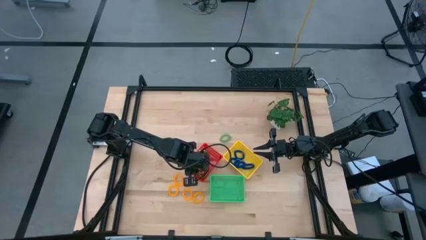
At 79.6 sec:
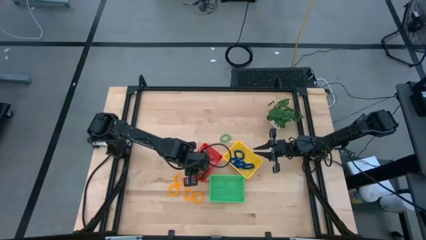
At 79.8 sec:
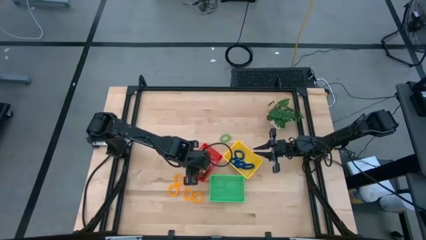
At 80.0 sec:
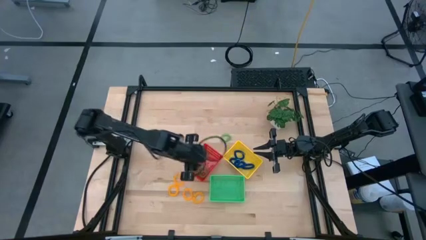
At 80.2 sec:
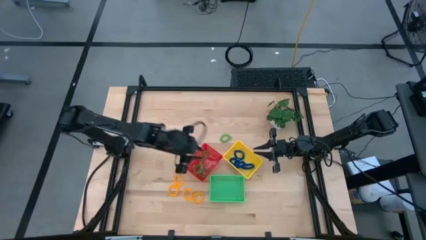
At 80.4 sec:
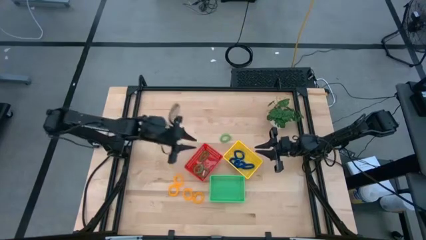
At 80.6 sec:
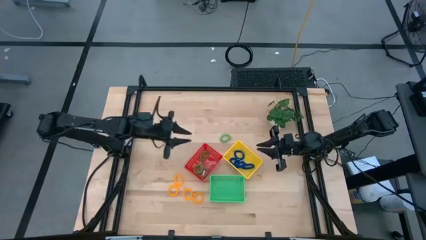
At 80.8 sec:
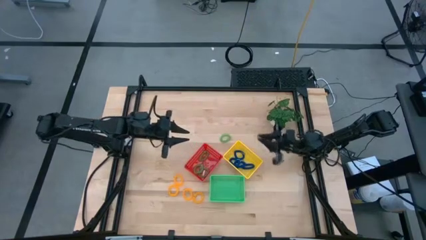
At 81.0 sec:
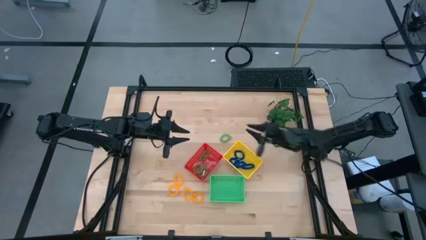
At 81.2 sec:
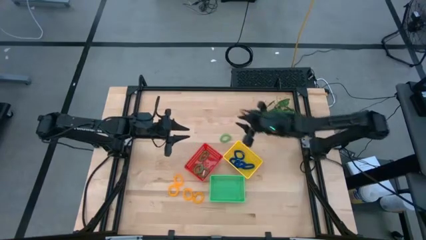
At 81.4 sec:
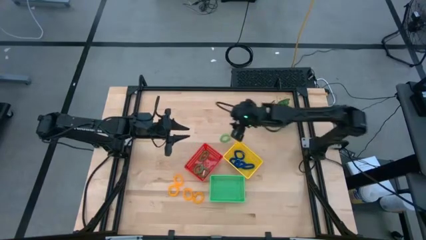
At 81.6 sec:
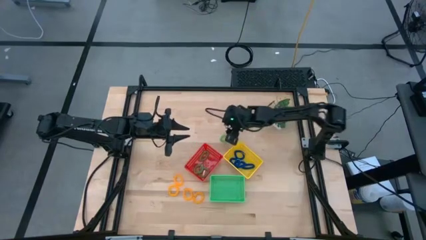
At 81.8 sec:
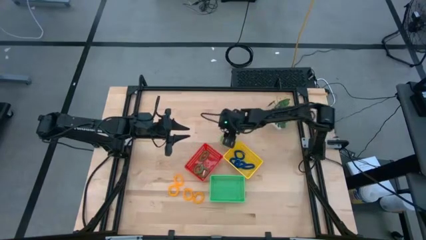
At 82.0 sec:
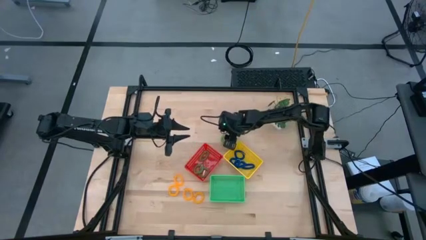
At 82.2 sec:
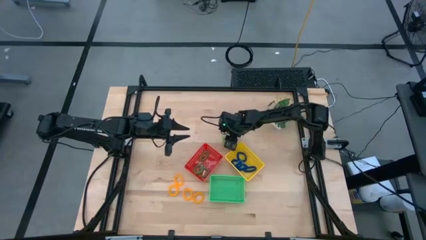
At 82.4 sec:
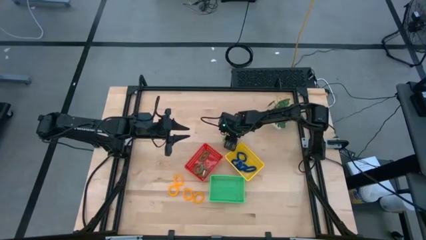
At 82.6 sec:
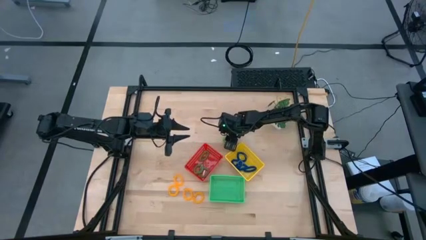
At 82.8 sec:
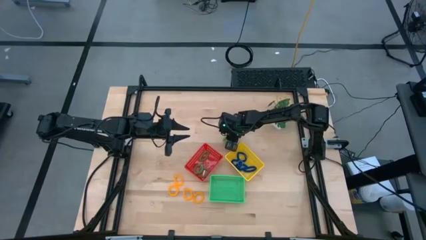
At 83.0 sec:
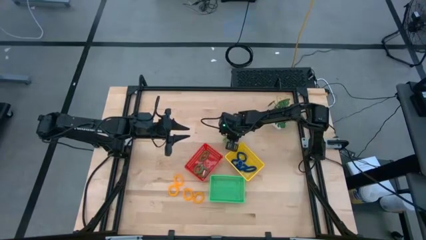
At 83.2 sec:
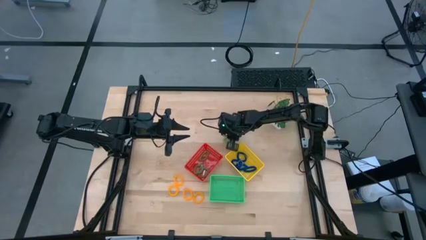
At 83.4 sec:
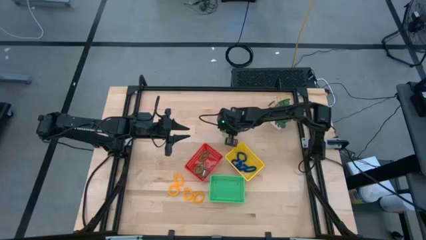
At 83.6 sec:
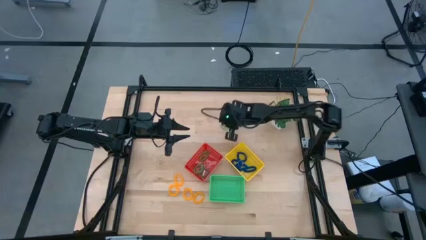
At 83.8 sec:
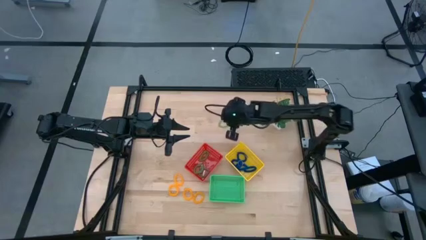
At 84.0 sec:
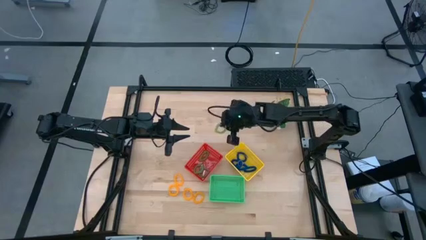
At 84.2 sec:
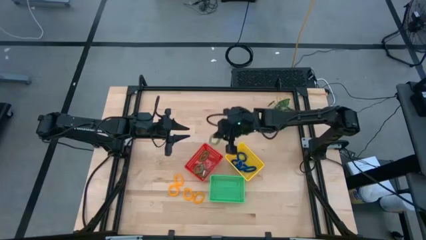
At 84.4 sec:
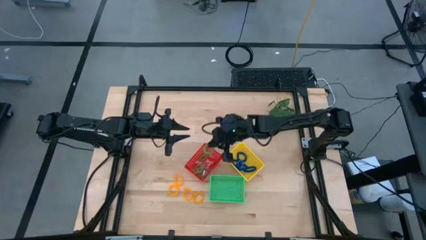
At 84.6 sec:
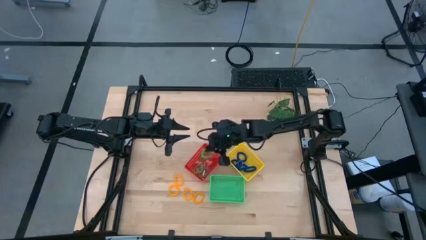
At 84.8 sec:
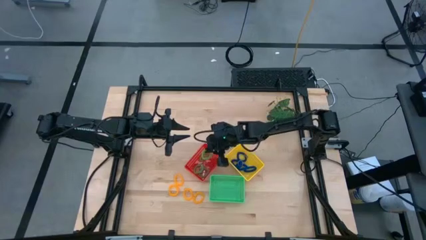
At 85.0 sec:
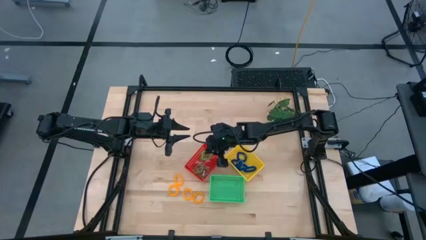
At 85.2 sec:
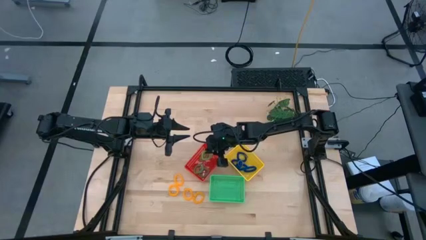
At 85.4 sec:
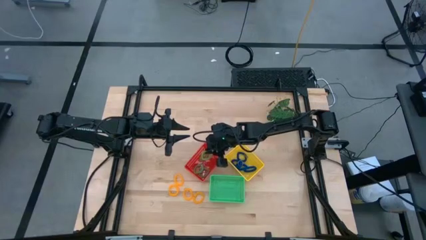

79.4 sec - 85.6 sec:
Task: Sort spring keychains
Put the green spring keychain into the red bin

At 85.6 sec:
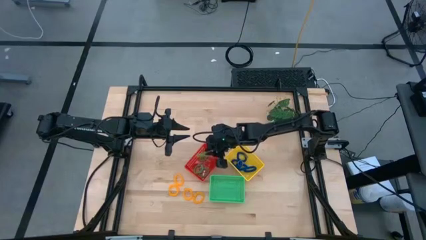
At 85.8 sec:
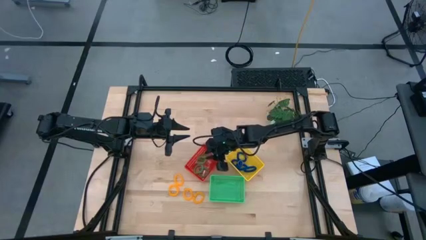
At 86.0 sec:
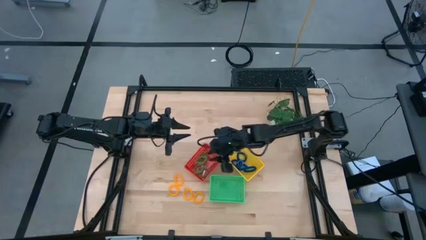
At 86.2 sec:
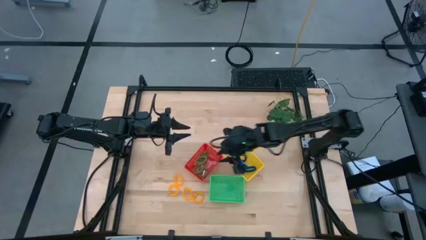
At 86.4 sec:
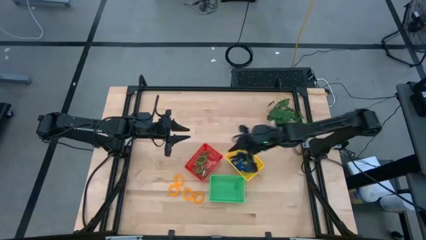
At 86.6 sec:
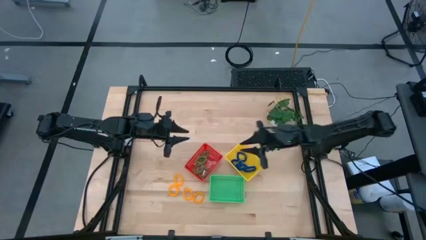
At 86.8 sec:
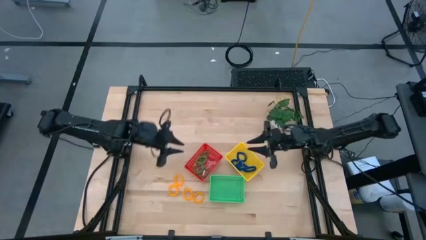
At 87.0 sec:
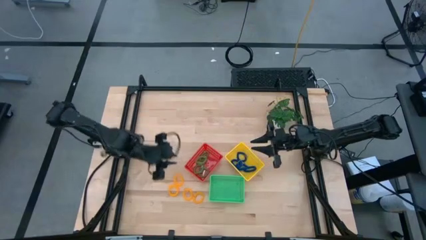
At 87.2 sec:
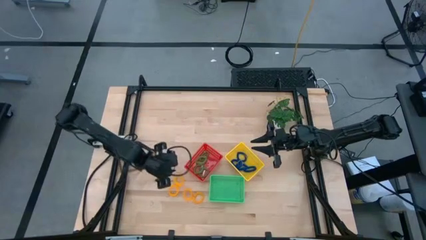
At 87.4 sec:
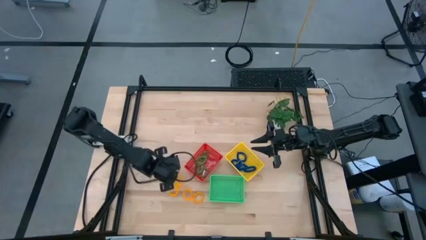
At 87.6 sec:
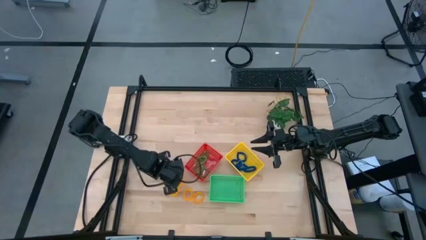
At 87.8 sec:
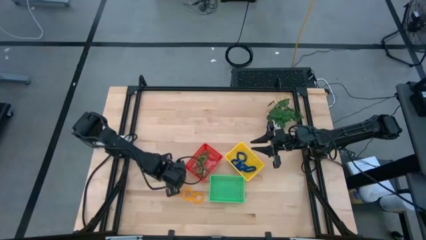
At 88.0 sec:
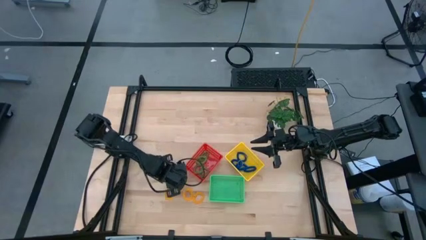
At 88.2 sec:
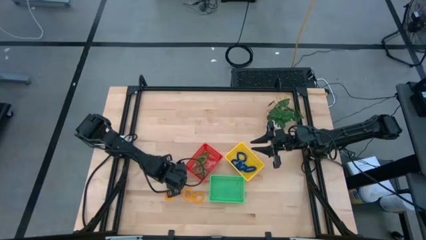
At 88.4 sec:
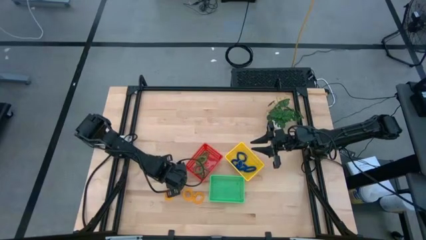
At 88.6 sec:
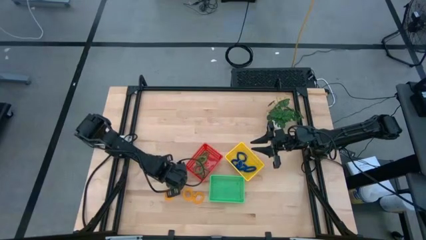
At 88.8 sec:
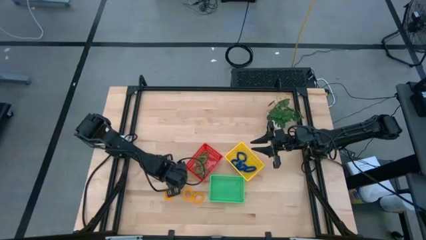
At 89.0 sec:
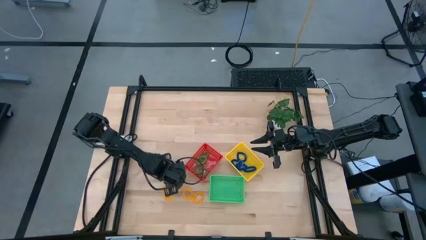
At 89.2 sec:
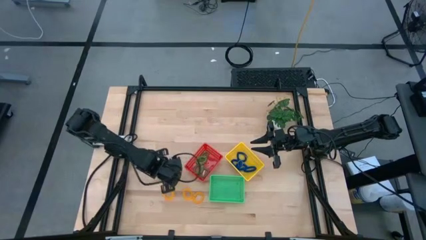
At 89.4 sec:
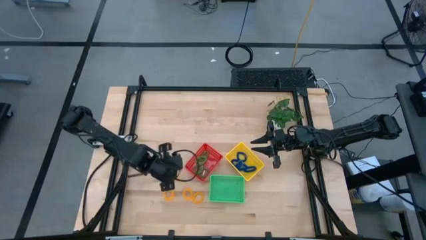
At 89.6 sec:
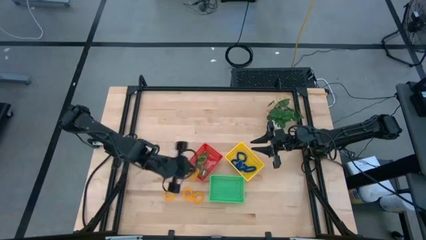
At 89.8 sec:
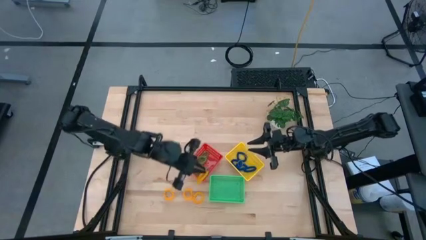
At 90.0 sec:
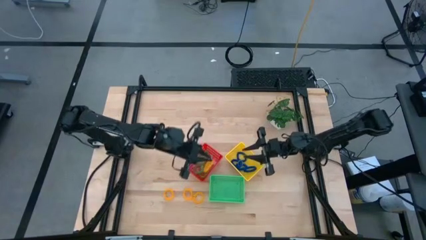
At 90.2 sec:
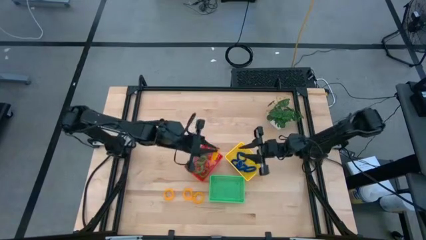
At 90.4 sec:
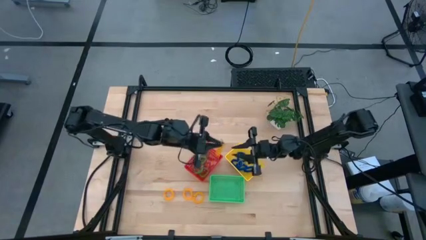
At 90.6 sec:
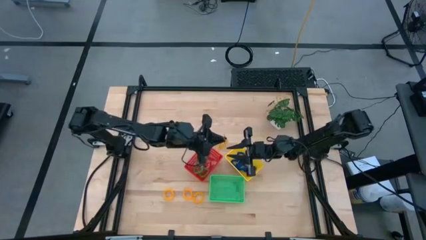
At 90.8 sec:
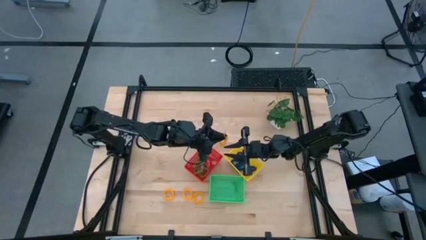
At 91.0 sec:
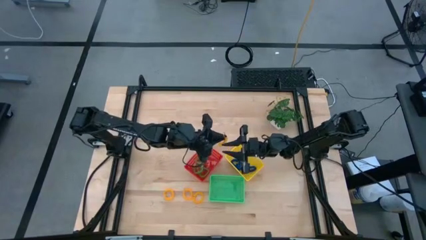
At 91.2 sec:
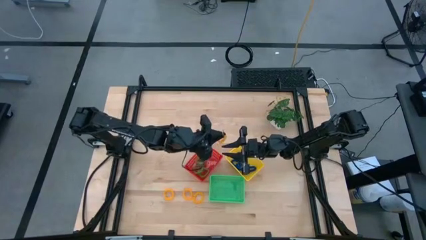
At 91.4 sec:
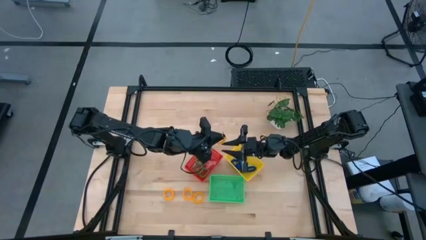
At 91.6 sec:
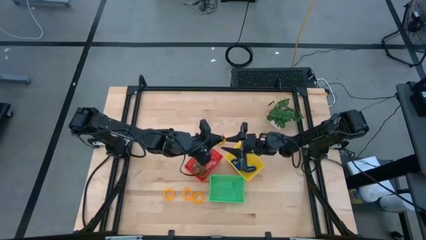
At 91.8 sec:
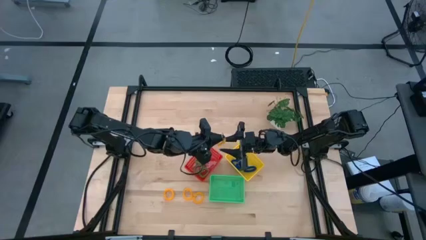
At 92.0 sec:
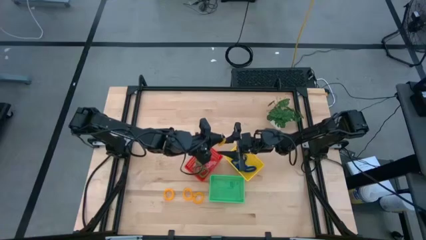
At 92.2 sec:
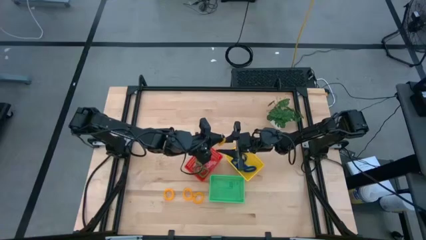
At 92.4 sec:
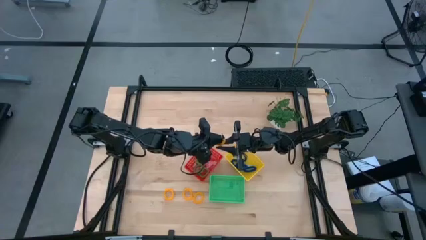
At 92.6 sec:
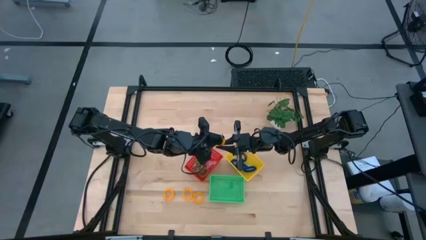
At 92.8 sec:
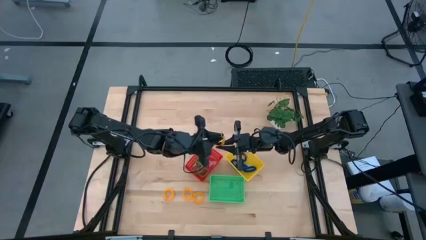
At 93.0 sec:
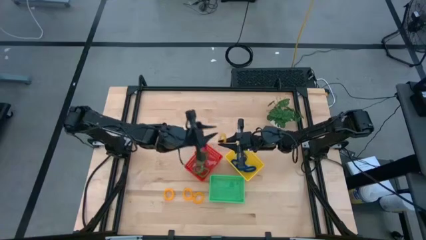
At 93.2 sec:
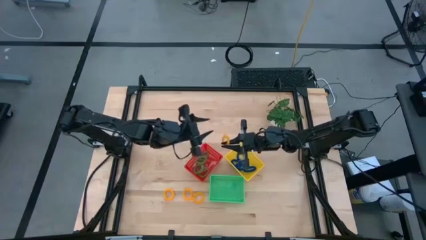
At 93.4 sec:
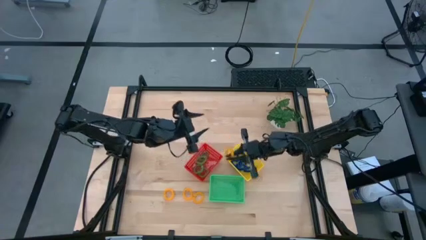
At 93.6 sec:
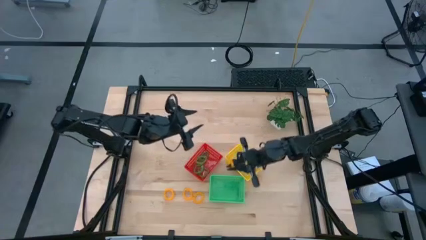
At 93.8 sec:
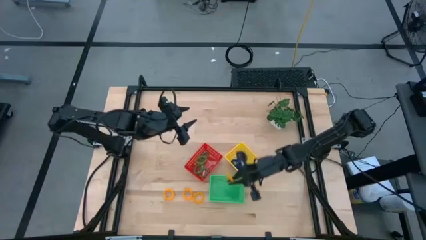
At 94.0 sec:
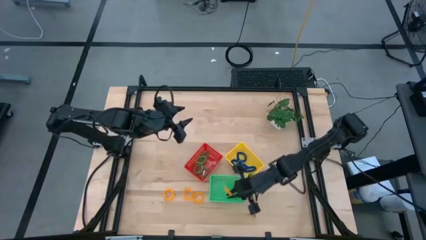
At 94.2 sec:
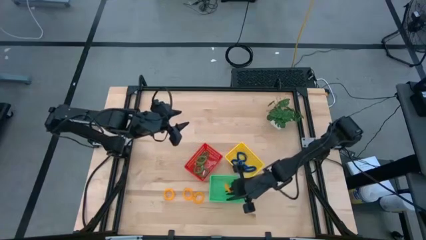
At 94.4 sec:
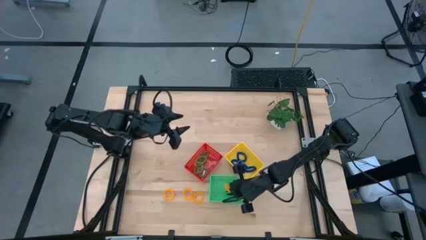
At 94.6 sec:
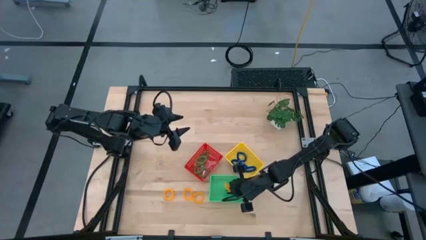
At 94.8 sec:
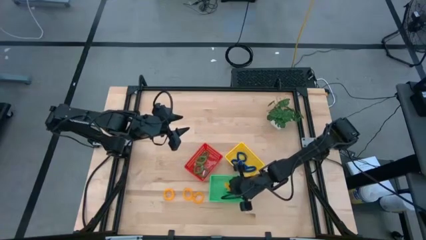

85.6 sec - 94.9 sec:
Put the yellow spring keychain into the green bin

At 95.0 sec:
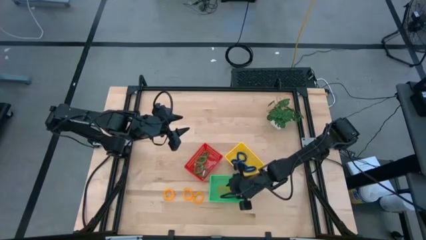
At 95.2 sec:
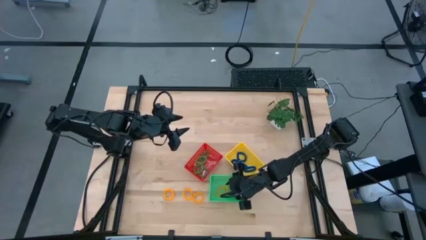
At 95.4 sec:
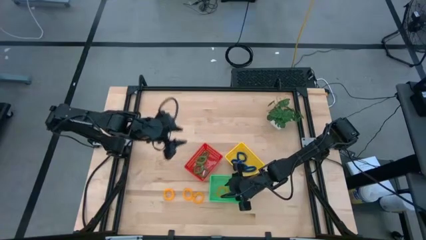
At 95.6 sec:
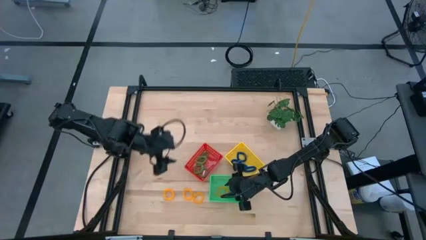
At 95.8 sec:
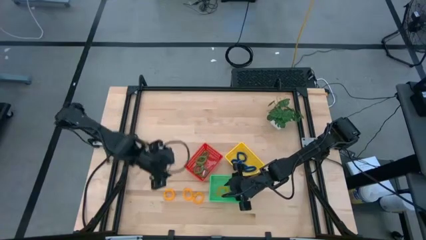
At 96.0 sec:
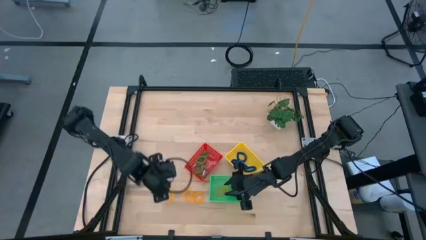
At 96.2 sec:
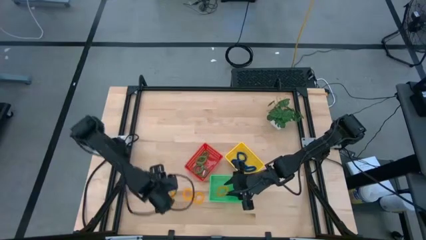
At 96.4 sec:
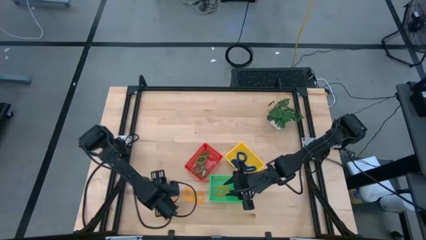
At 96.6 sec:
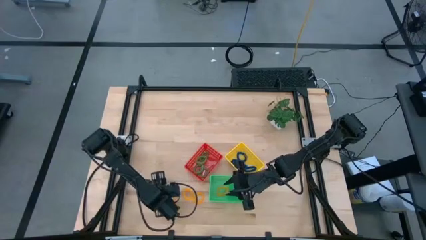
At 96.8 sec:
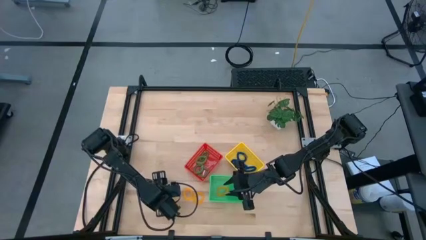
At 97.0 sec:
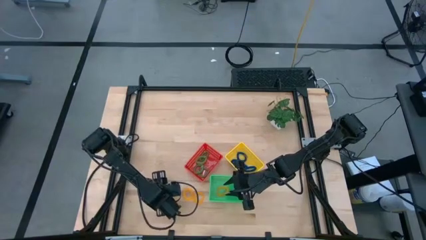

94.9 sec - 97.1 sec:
Put the yellow spring keychain into the green bin
